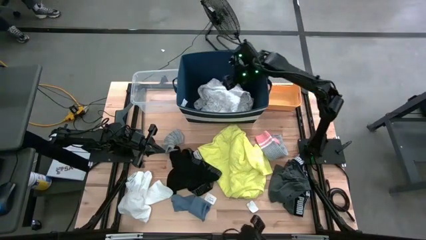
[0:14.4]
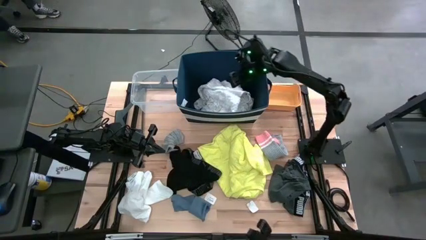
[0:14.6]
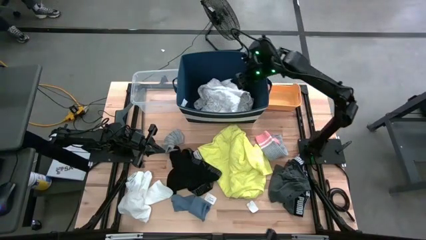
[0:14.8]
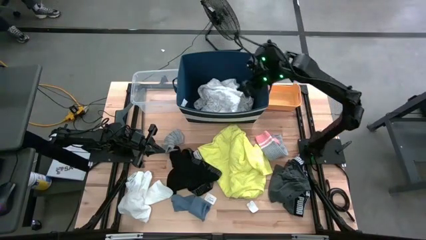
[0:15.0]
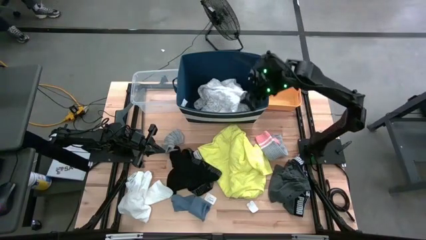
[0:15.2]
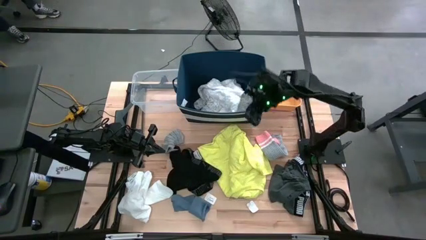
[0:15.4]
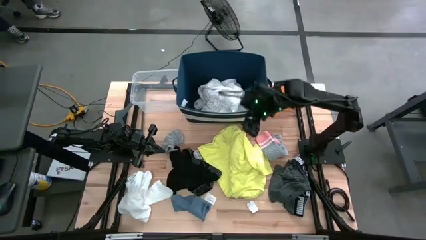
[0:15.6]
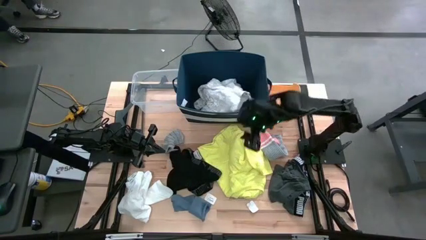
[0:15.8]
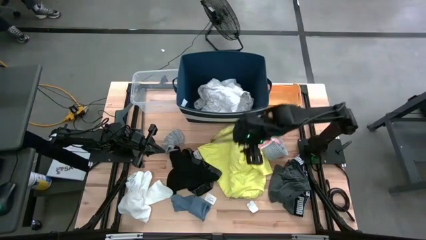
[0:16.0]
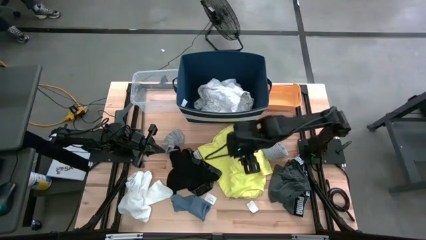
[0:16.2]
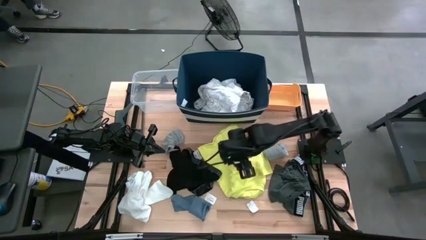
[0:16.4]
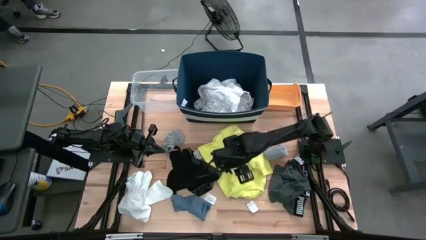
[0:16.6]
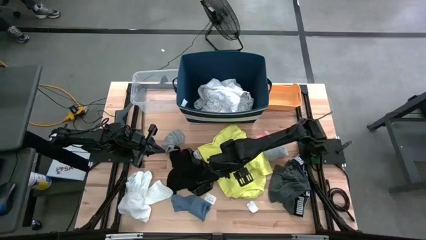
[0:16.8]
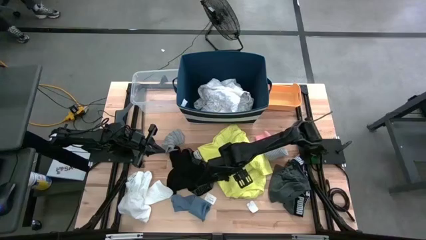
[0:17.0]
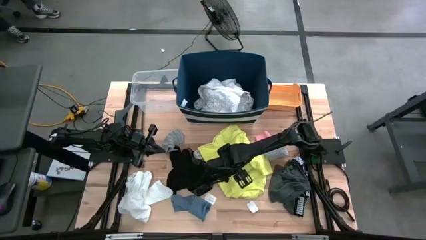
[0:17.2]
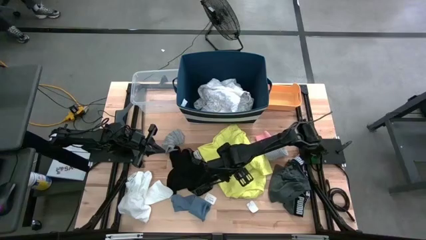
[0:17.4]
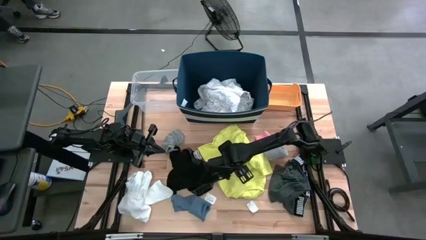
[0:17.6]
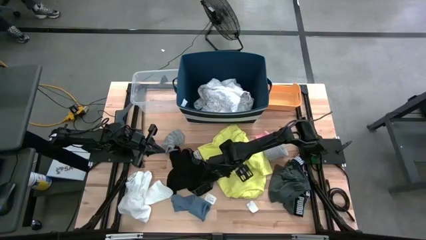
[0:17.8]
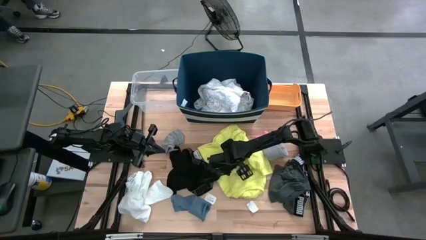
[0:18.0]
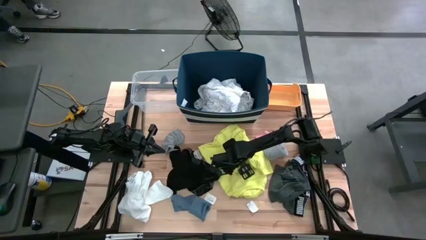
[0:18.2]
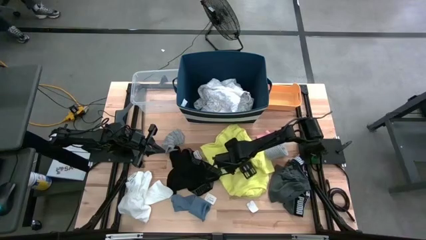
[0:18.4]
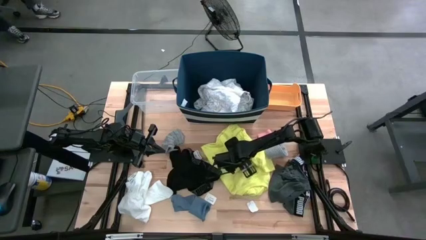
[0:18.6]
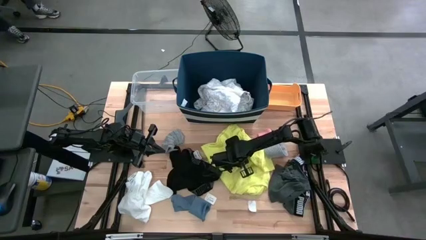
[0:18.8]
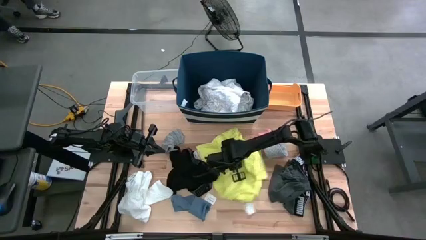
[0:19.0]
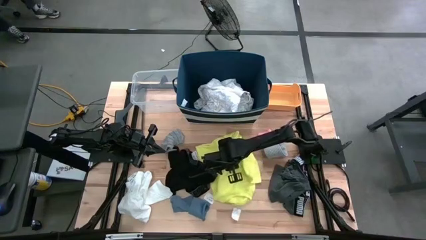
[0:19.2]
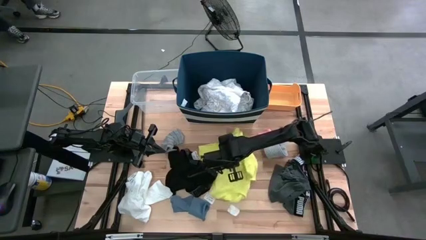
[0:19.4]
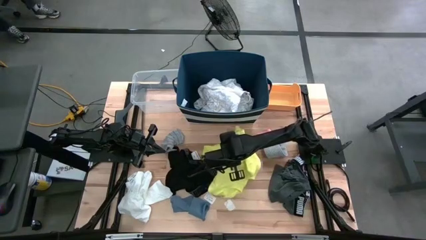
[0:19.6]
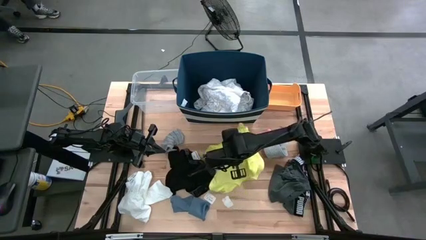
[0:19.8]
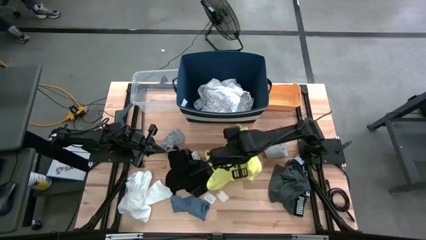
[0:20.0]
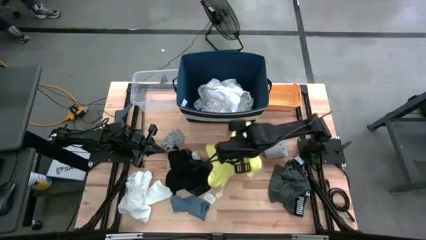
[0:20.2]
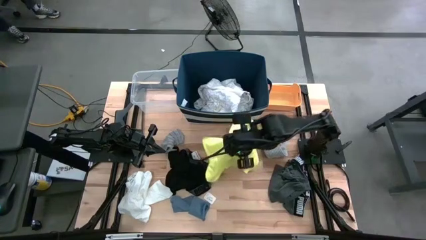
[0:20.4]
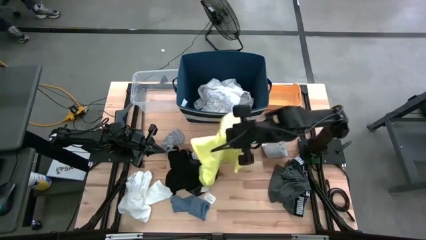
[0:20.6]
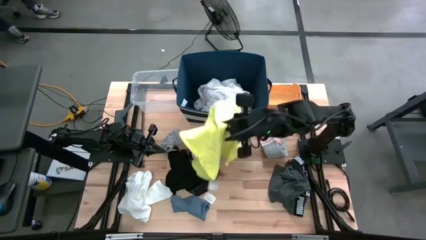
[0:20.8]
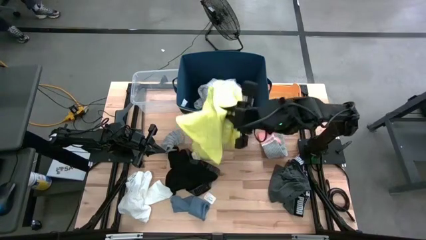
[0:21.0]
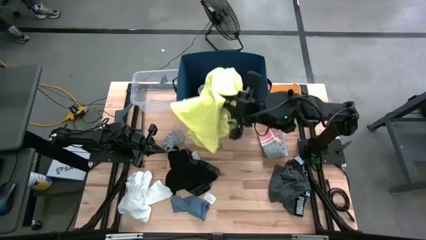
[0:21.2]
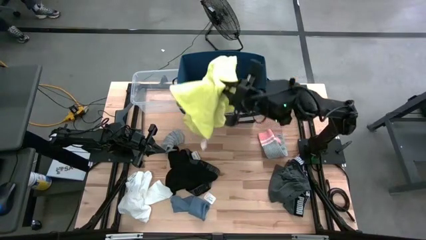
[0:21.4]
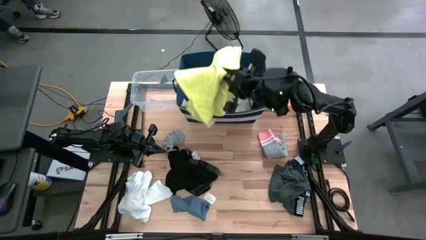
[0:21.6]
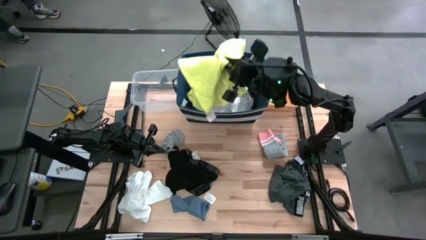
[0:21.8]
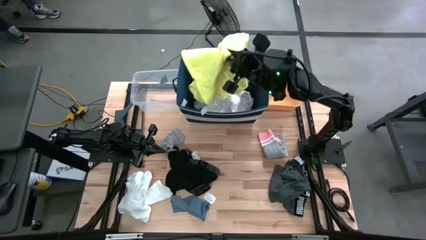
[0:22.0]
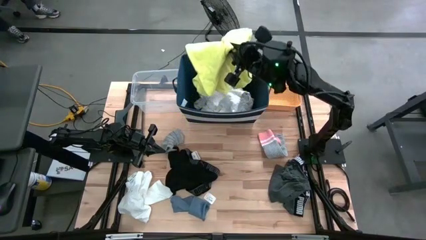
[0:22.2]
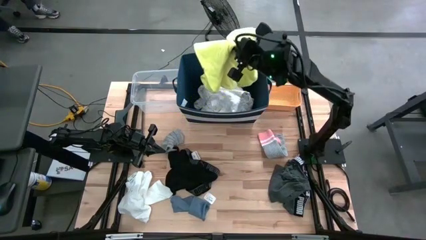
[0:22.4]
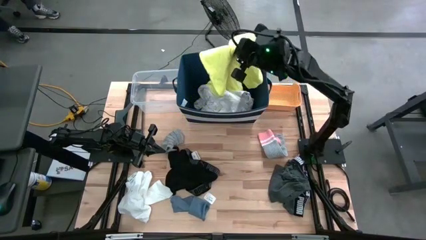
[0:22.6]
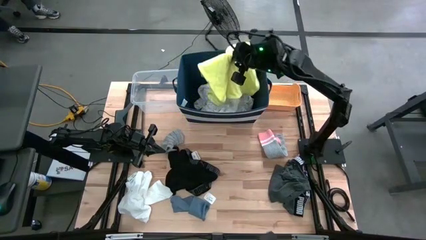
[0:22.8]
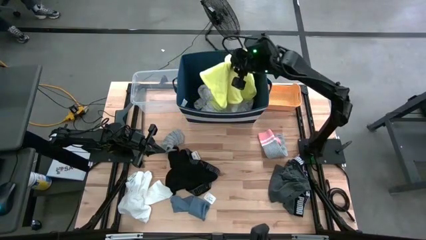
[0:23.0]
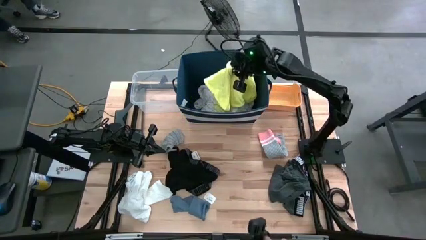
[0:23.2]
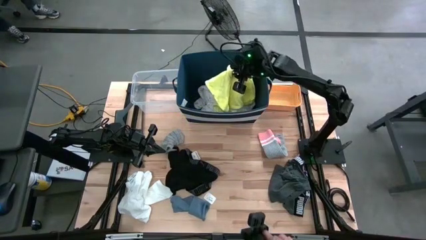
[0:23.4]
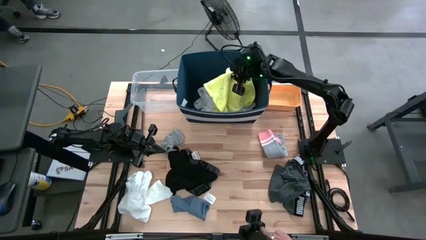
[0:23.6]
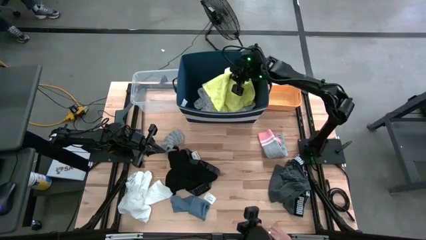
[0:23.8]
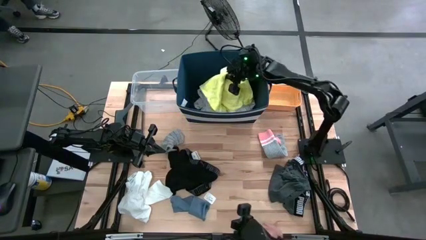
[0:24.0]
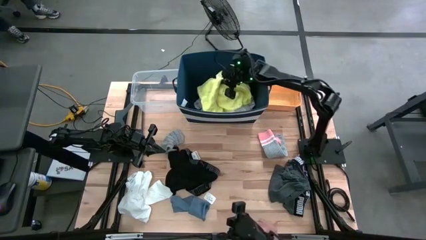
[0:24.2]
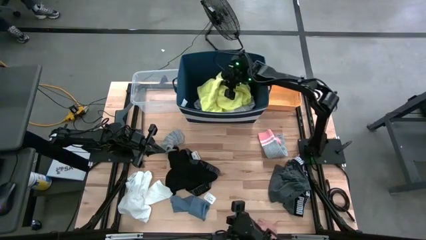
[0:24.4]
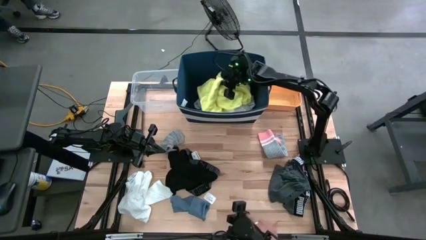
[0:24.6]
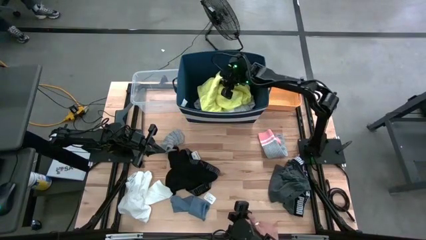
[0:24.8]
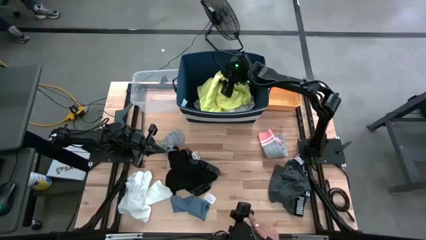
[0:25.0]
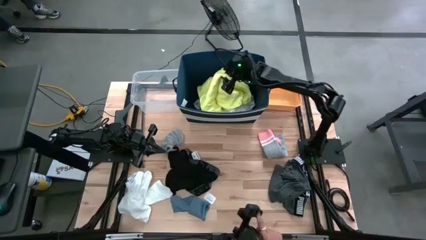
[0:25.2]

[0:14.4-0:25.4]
Task: Pick & Place Cloths
Put the yellow shirt into the blue basket

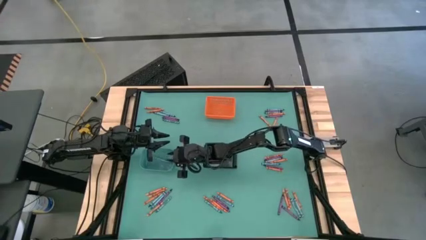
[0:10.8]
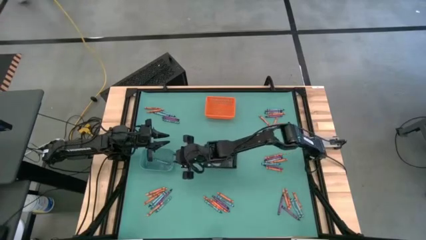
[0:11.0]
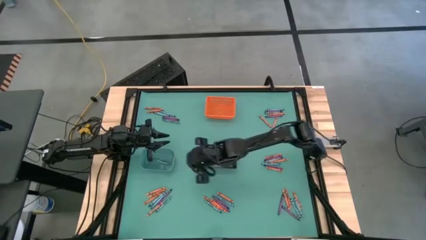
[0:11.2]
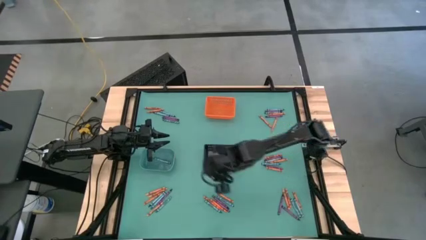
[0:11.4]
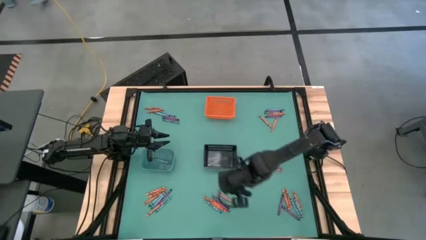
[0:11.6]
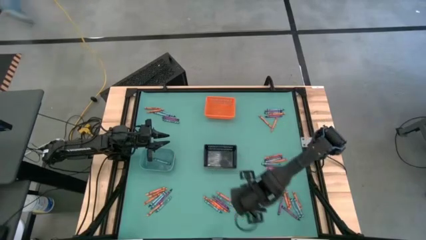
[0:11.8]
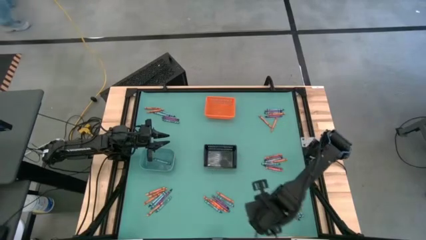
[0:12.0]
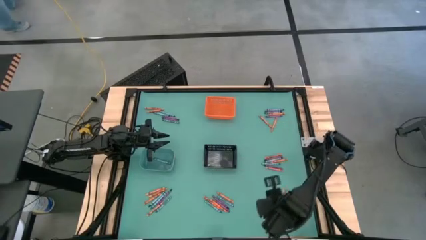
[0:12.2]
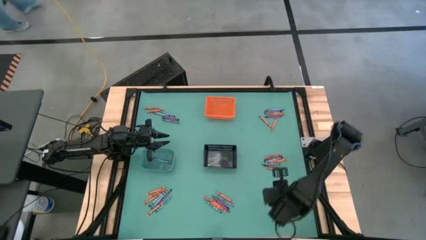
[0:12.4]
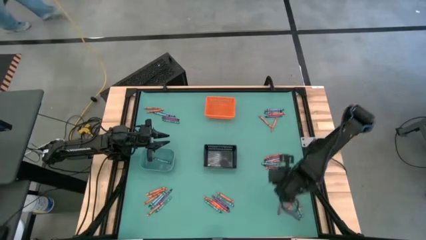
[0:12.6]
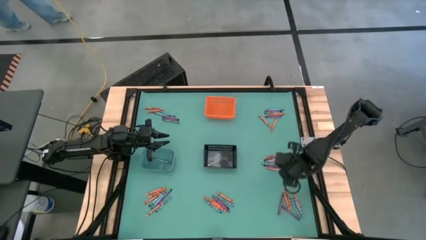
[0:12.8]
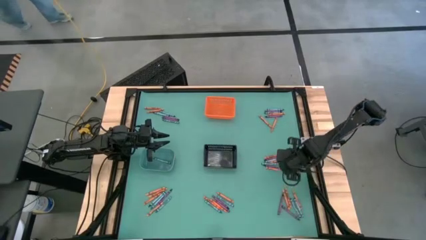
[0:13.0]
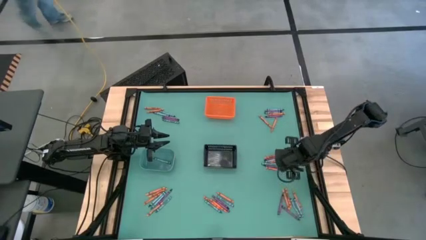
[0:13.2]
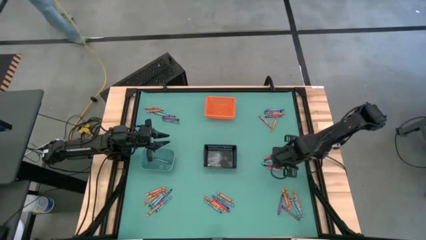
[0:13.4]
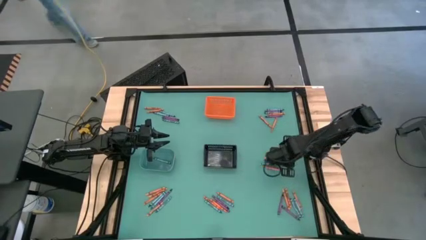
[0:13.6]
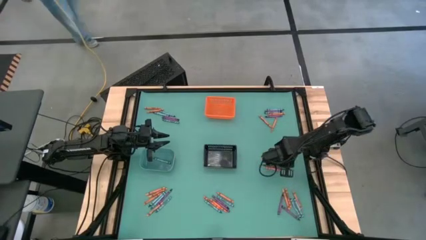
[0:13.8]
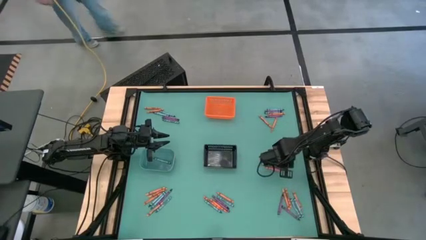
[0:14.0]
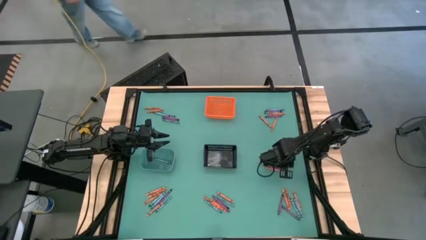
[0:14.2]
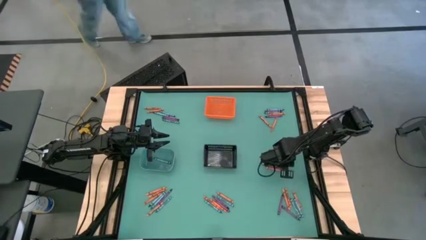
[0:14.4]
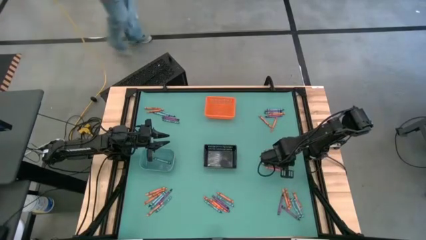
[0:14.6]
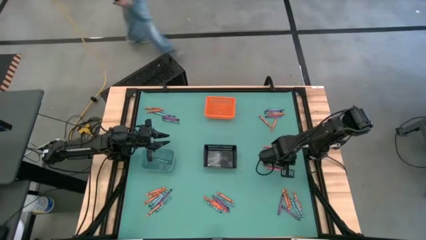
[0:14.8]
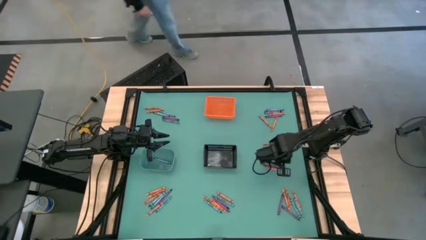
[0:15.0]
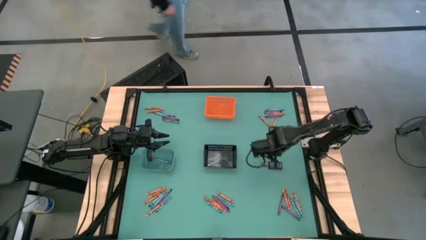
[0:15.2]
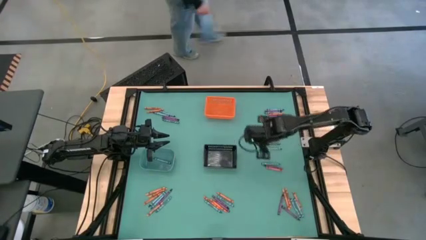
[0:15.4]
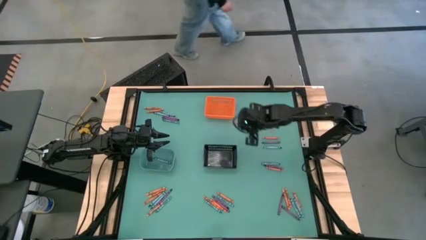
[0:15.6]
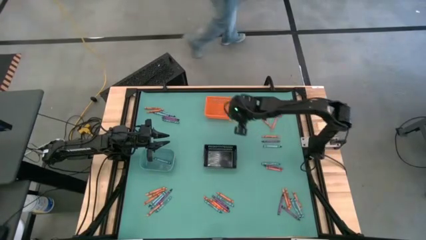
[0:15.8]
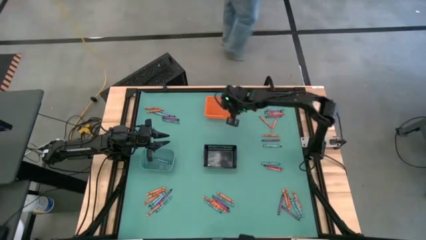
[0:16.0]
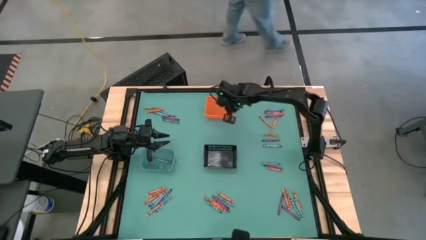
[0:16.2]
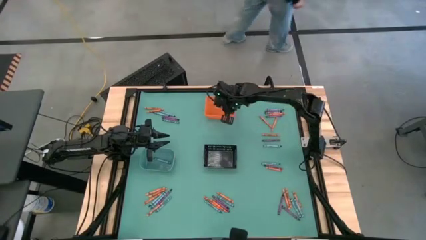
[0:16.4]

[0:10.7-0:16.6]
Task: Sort crayons
Put the orange crayon into the orange bin
